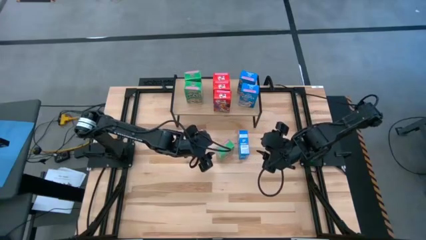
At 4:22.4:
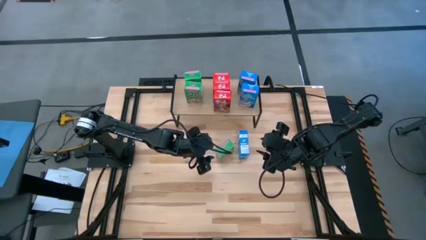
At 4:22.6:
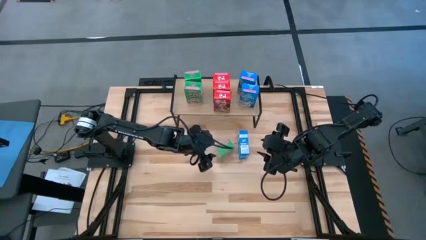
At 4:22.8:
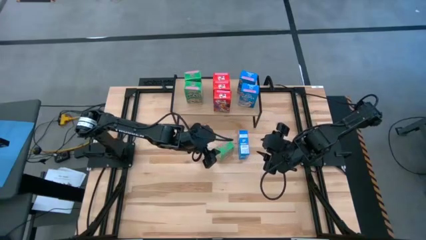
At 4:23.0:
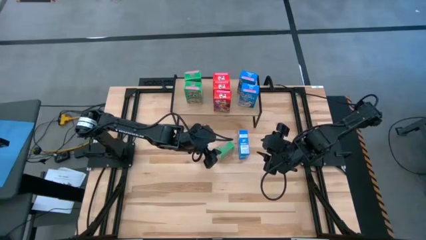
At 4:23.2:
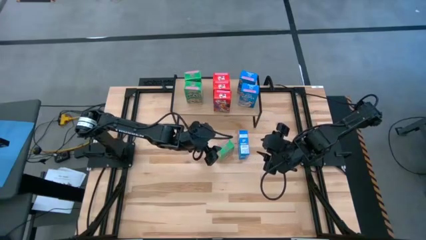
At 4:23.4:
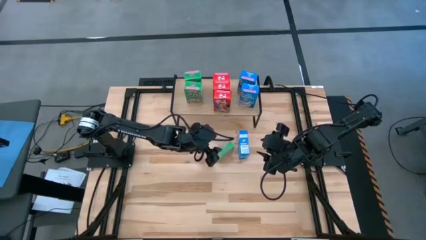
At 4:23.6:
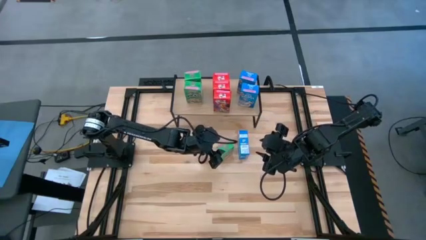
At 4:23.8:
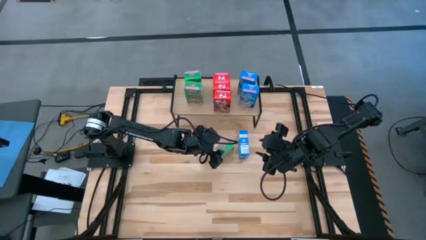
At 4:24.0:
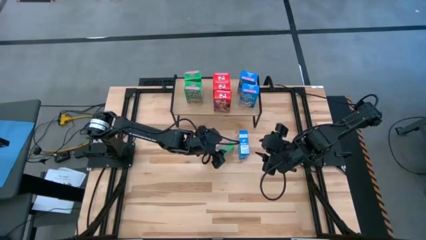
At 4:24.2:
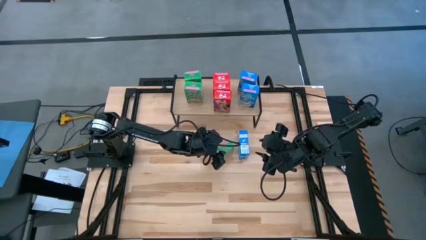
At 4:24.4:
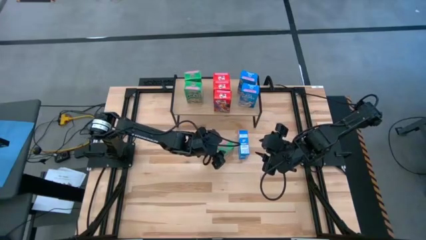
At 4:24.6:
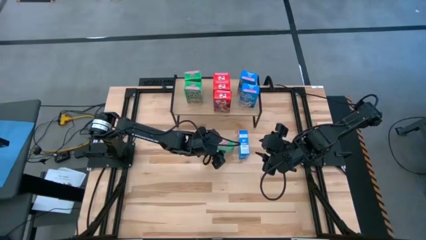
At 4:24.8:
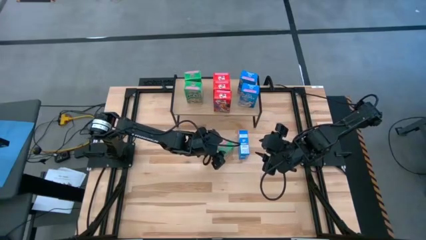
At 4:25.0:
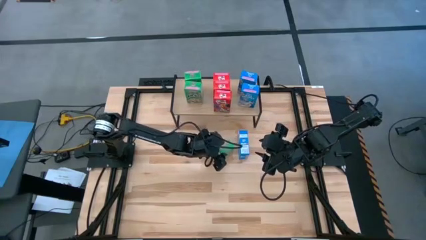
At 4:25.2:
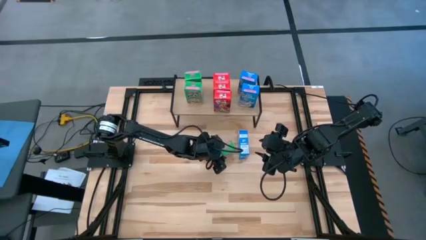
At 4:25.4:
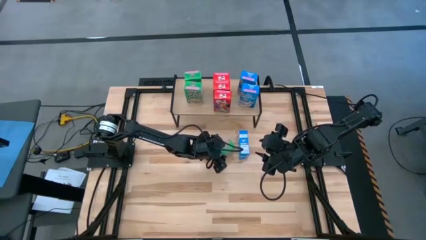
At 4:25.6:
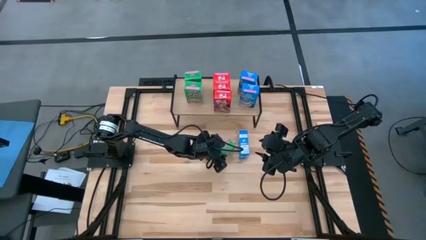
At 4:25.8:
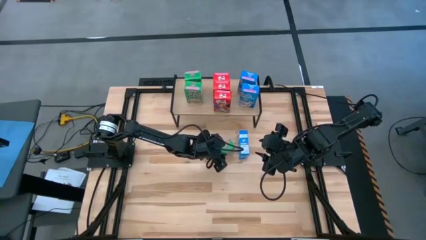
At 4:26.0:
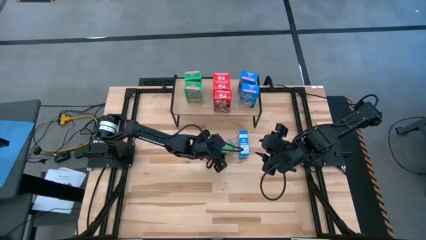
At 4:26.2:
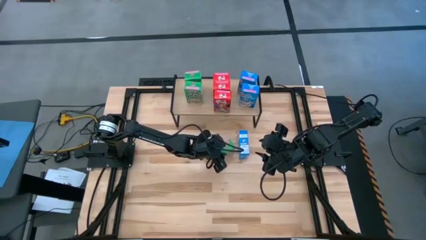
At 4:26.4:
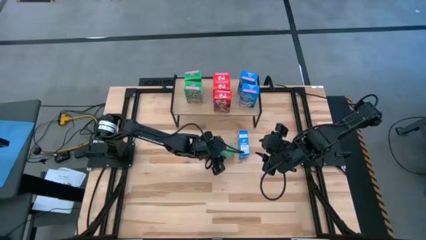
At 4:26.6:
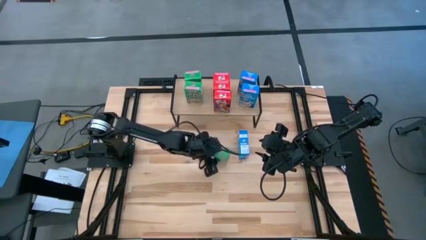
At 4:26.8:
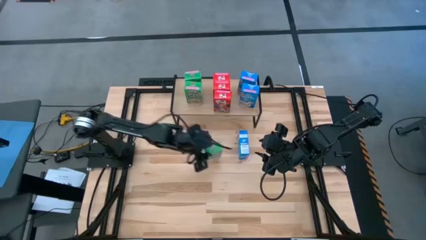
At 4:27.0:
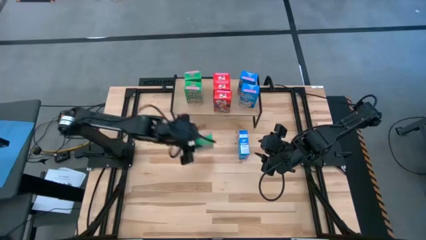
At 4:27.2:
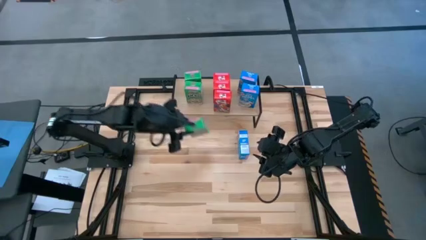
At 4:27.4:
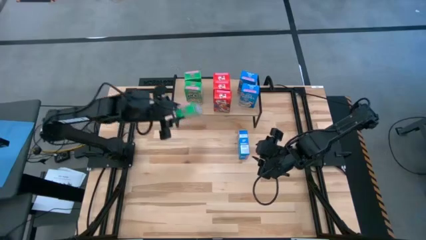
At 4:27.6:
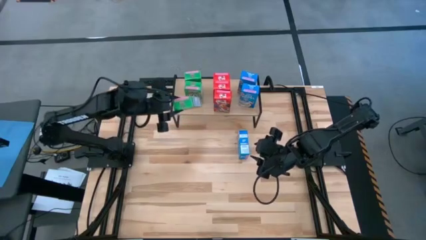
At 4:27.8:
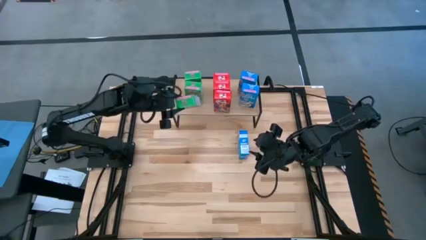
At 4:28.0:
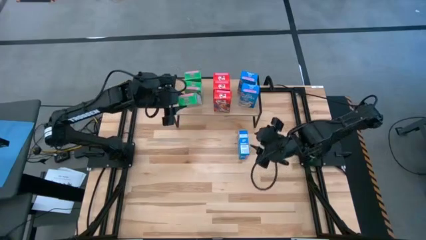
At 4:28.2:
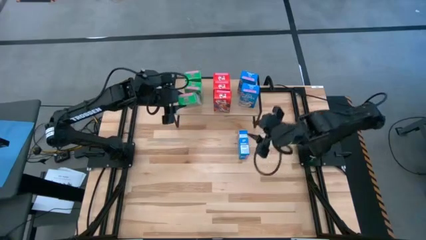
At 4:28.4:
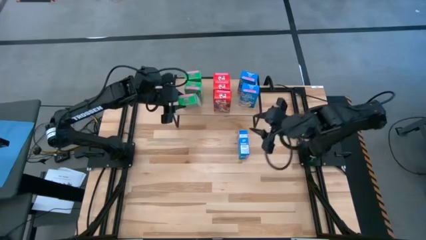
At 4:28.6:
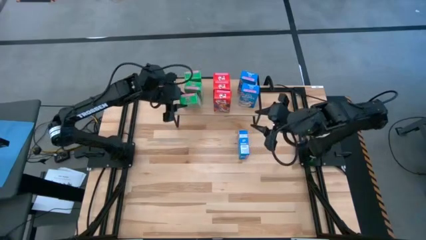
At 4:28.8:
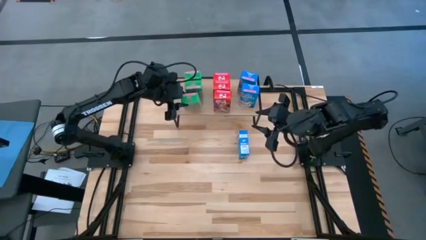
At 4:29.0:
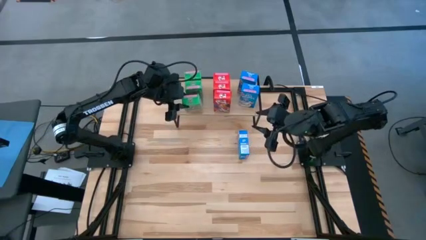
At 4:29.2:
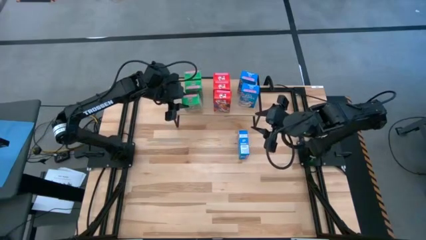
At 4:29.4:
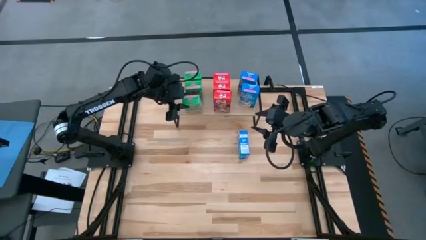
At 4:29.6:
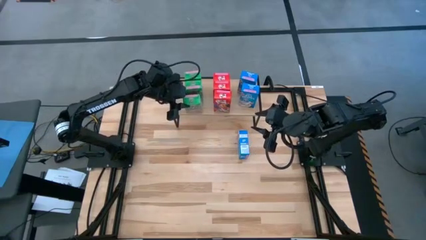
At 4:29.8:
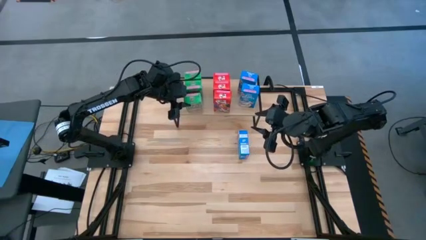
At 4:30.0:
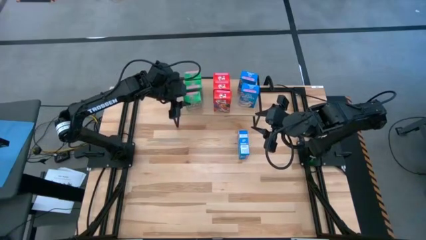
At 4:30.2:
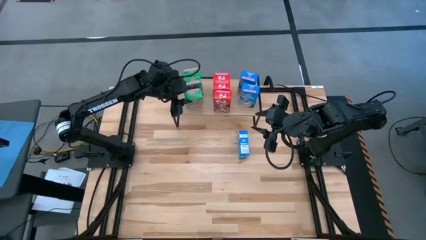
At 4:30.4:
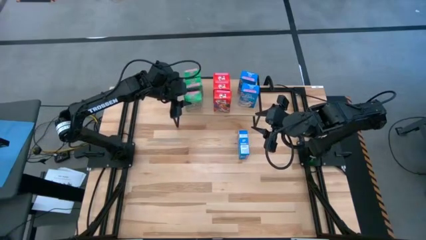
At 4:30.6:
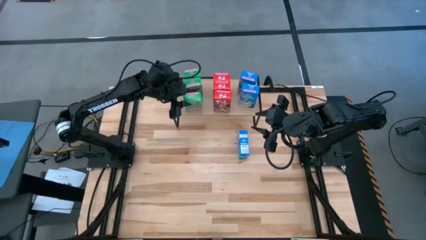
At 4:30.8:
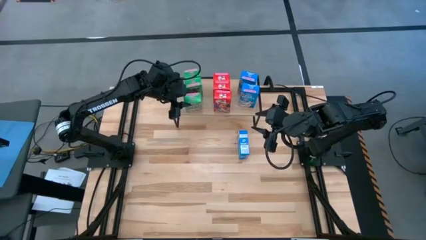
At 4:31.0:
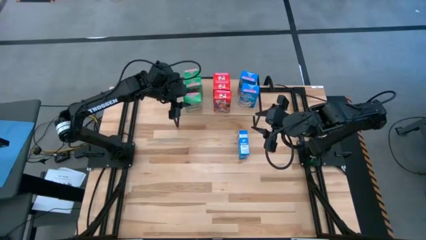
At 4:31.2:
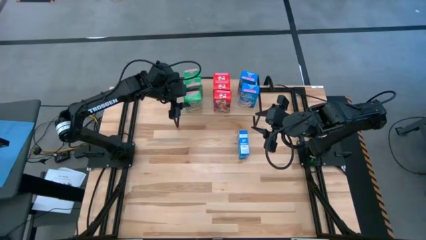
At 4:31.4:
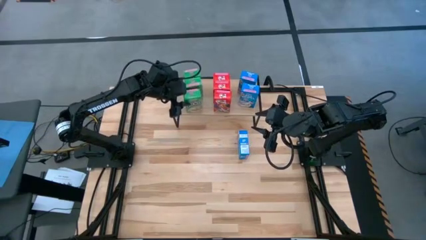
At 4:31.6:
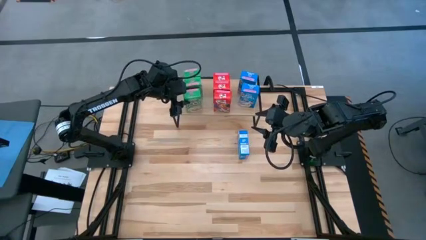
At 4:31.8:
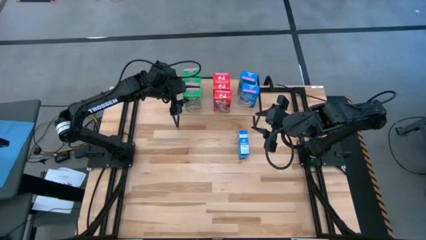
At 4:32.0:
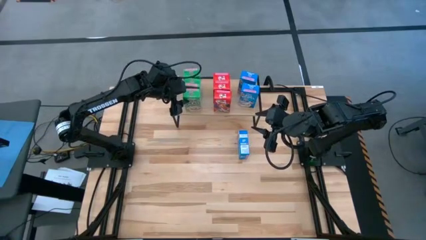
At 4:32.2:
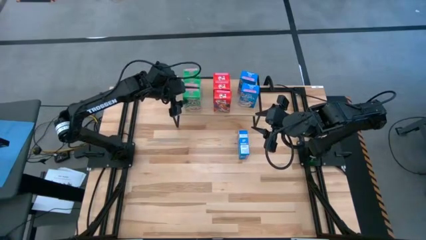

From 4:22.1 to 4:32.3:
Task: Stack cereal on shelf
Put the green cereal box on the shelf aligned with the other green cereal boxes

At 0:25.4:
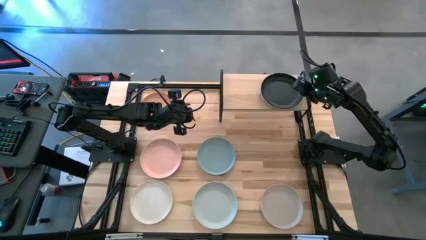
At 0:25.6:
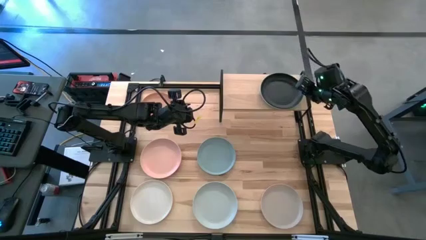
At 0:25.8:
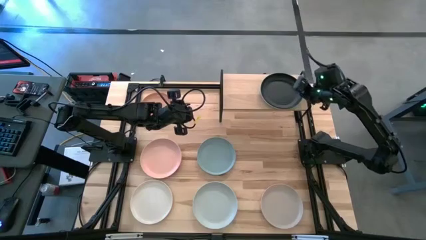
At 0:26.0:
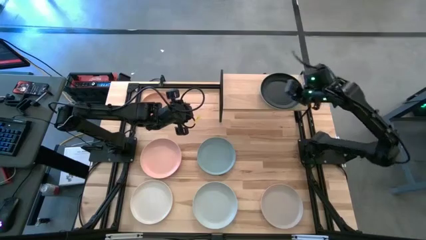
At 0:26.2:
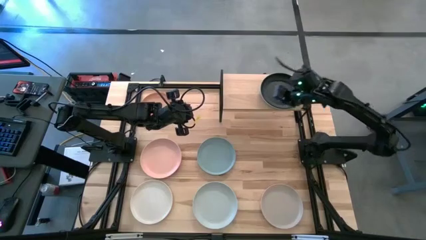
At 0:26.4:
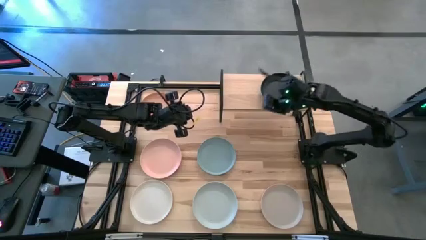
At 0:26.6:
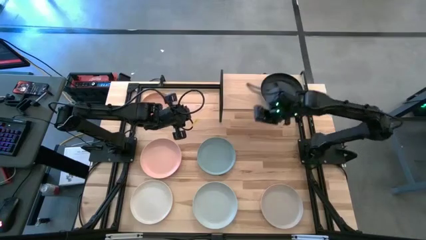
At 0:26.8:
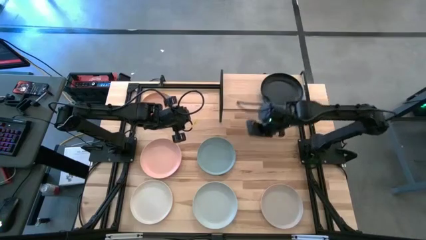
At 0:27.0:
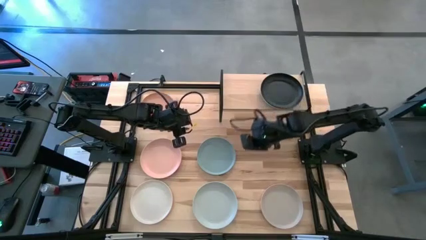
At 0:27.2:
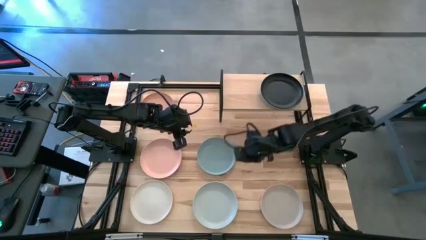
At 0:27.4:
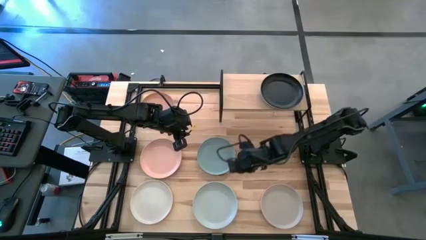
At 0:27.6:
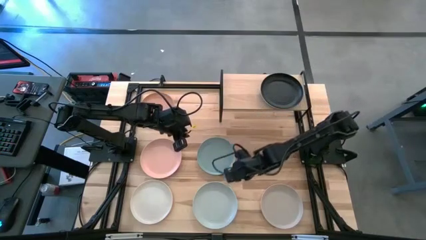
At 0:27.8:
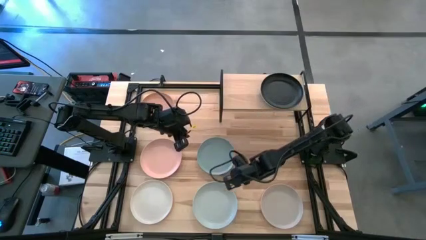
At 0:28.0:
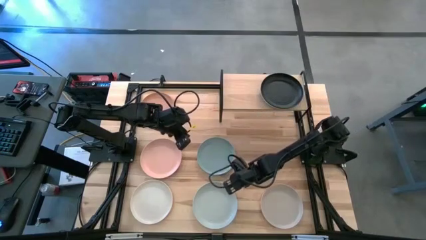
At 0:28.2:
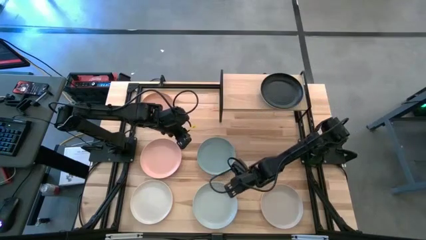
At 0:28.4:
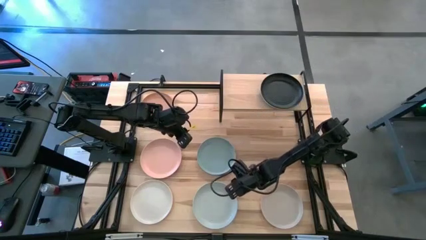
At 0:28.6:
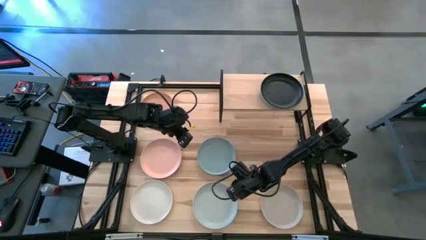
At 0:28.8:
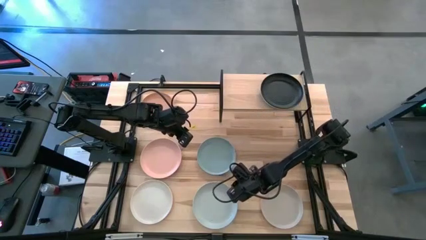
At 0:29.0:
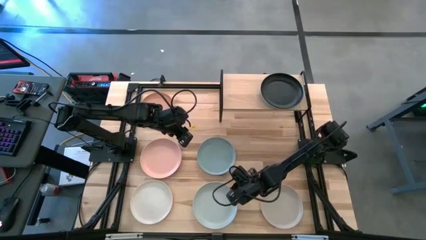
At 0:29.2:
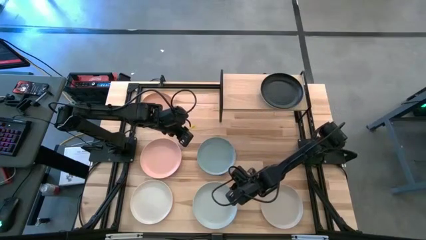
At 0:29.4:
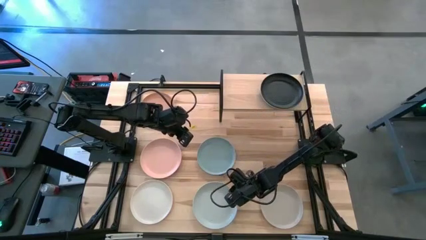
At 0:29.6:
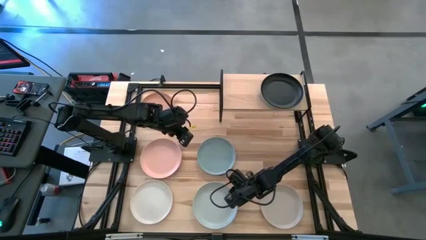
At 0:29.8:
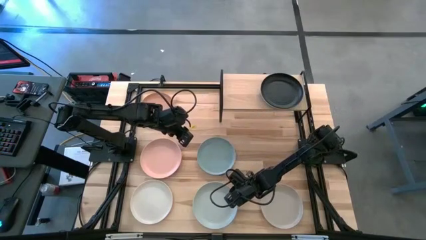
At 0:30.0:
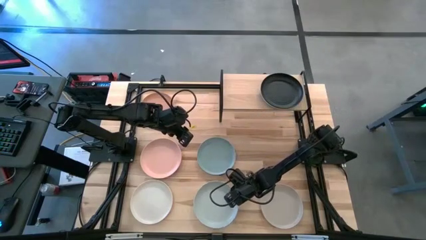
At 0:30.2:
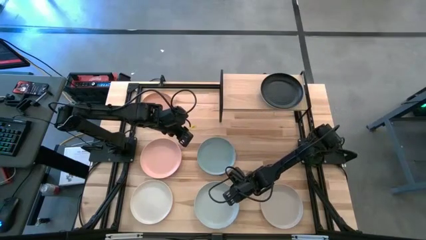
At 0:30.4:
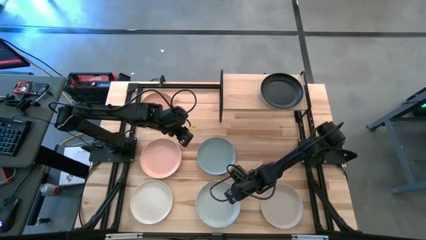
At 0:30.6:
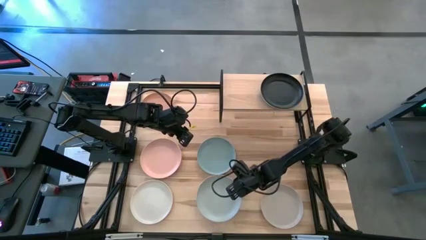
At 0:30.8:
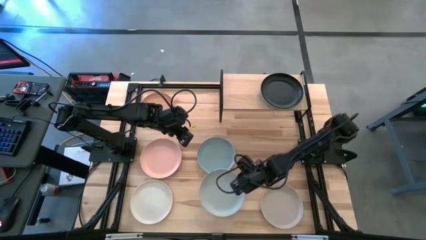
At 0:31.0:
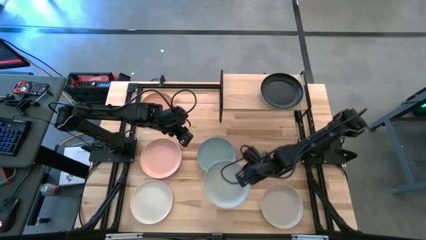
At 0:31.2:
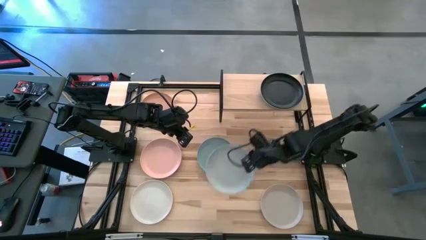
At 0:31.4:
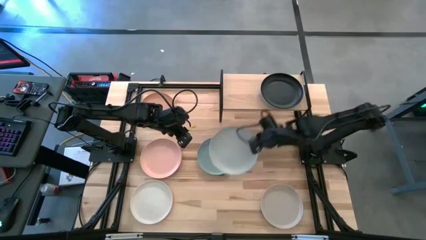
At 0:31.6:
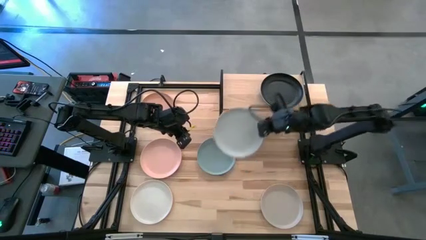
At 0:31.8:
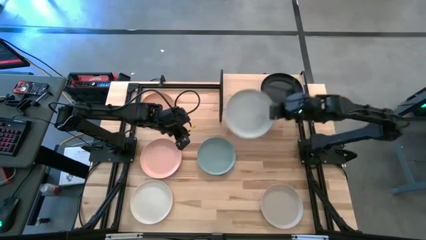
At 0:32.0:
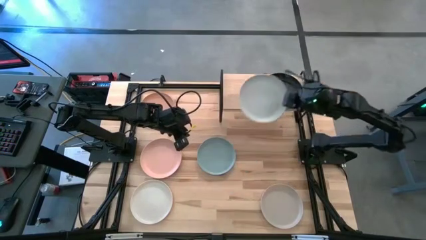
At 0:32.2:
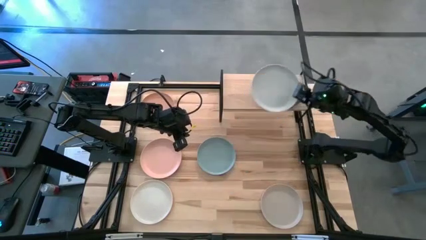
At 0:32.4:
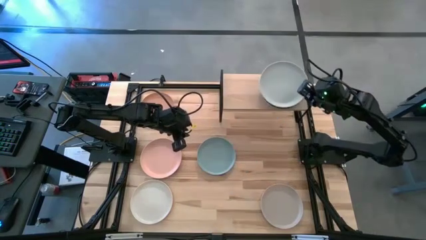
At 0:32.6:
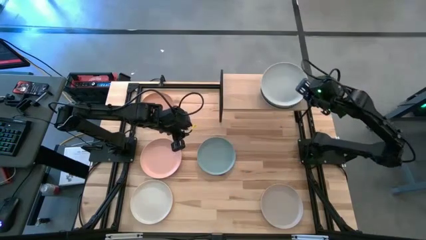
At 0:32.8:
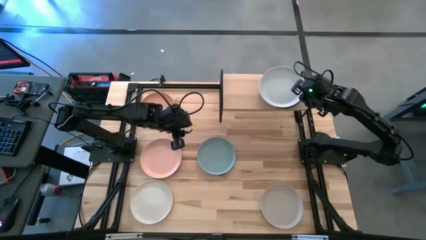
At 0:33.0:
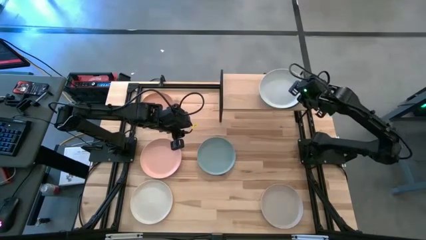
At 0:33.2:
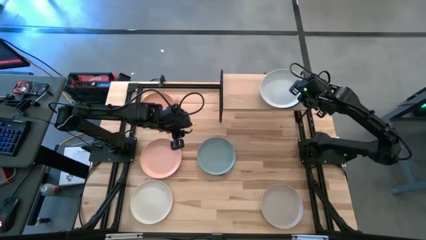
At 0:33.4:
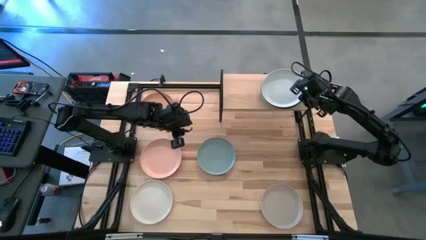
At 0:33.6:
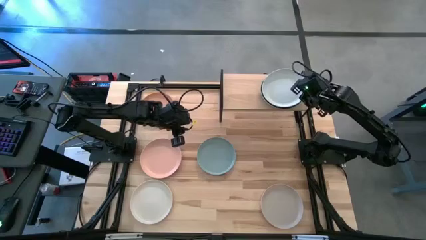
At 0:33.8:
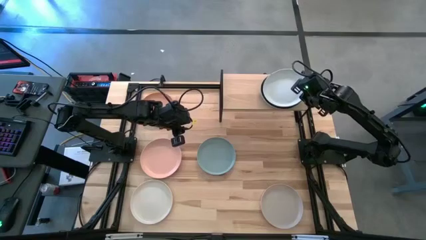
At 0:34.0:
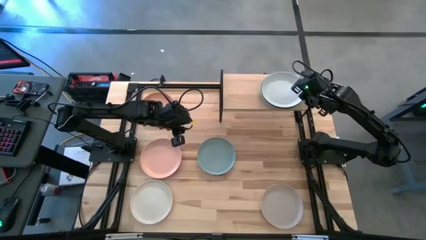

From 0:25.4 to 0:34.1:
Task: Place and stack plates onto a shelf
Stack the light gray plate on top of the black stacked plates on the shelf
